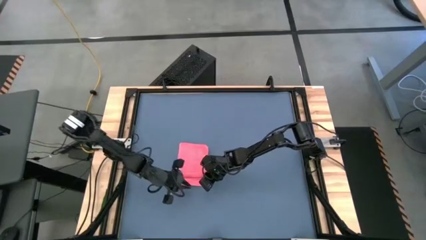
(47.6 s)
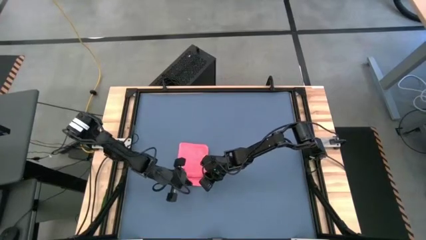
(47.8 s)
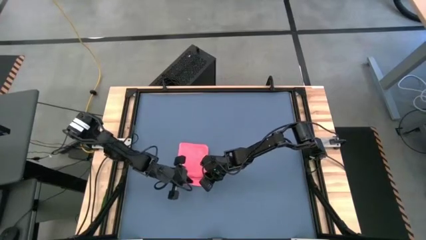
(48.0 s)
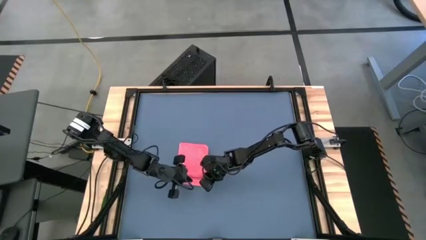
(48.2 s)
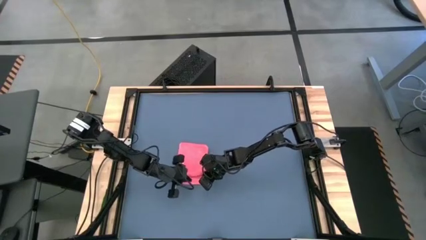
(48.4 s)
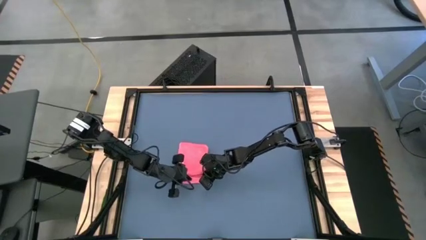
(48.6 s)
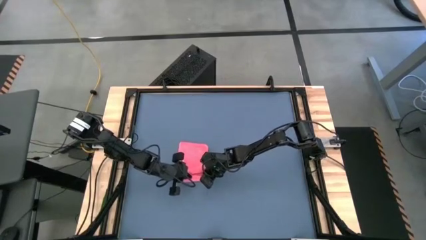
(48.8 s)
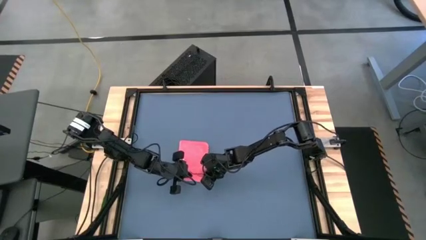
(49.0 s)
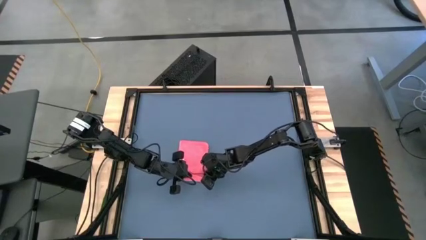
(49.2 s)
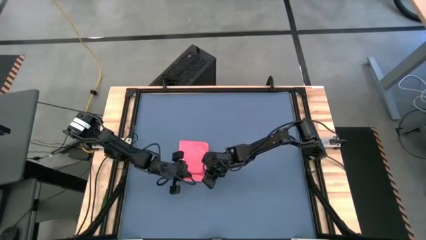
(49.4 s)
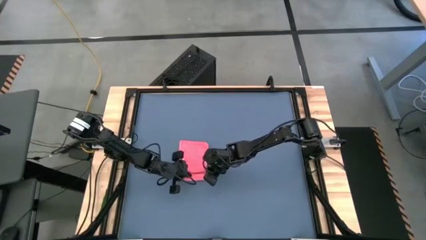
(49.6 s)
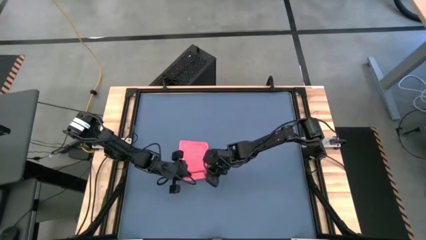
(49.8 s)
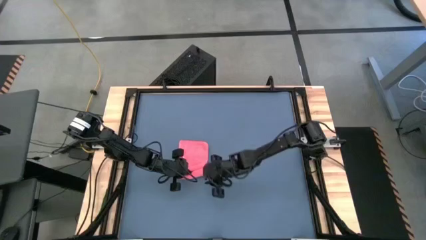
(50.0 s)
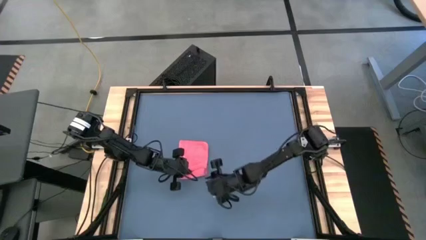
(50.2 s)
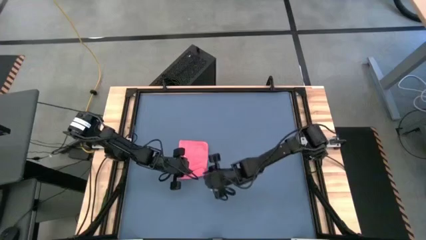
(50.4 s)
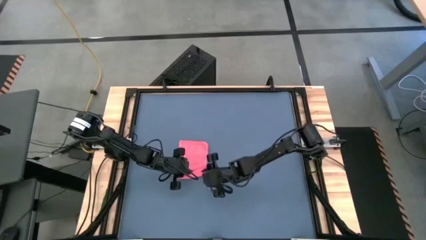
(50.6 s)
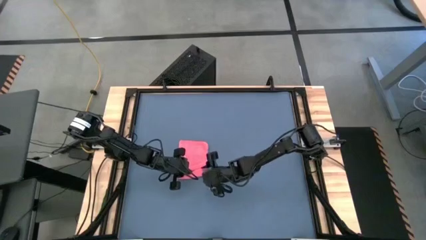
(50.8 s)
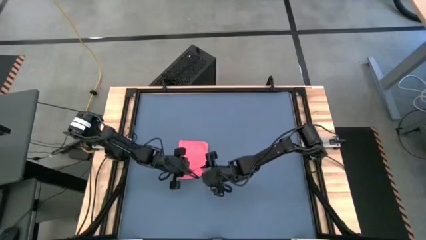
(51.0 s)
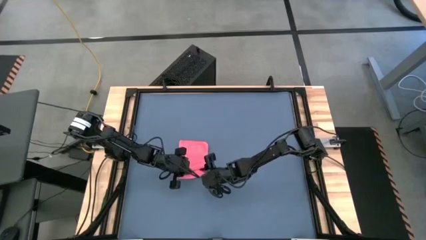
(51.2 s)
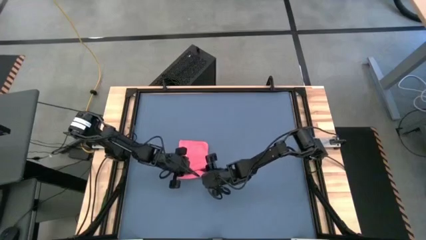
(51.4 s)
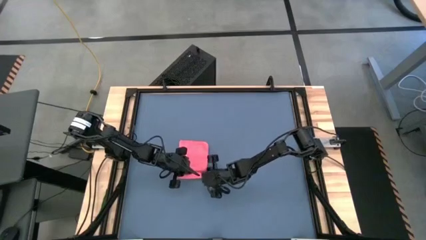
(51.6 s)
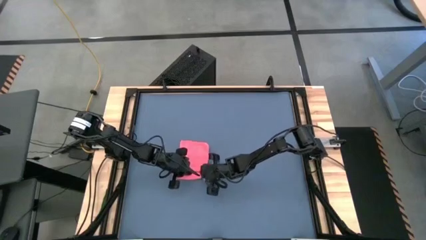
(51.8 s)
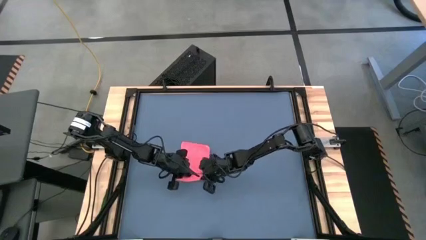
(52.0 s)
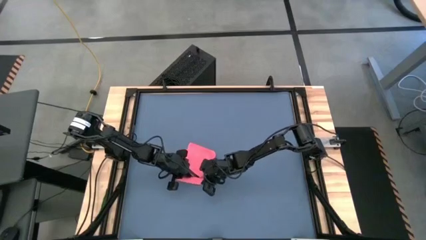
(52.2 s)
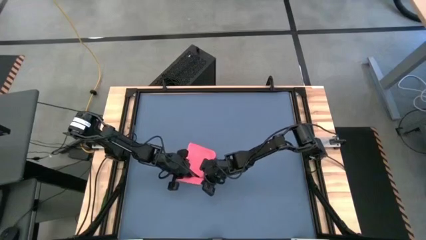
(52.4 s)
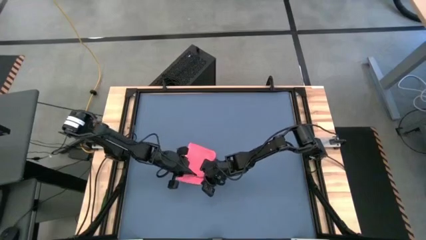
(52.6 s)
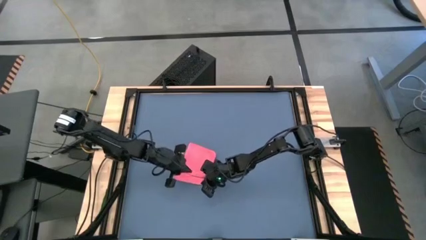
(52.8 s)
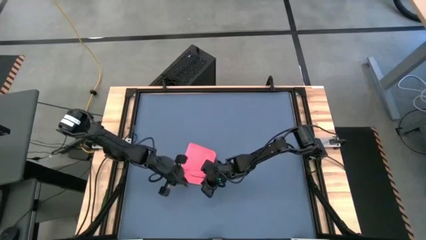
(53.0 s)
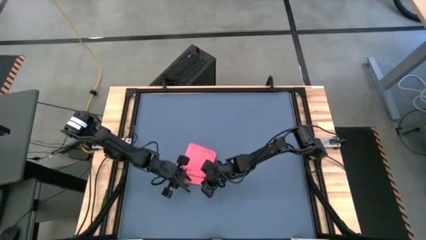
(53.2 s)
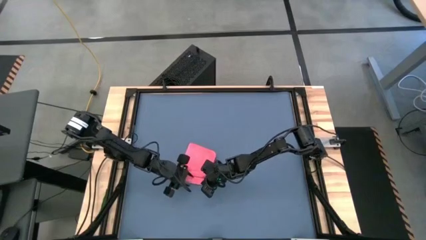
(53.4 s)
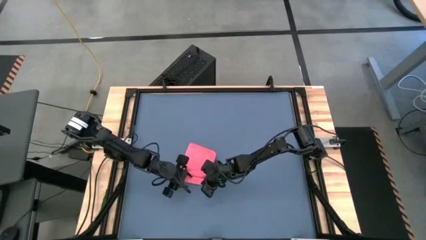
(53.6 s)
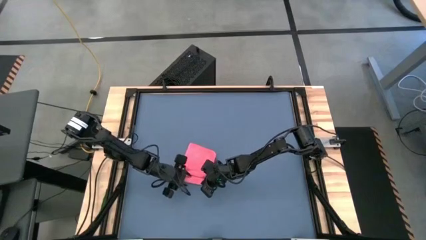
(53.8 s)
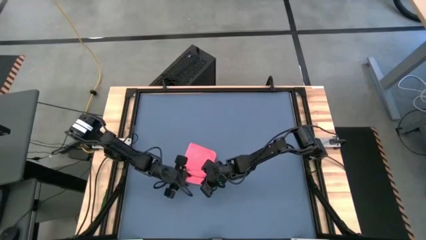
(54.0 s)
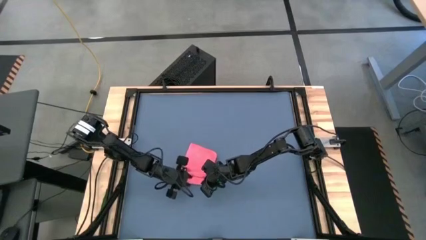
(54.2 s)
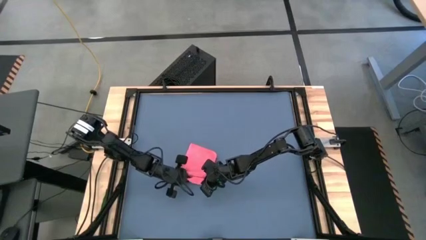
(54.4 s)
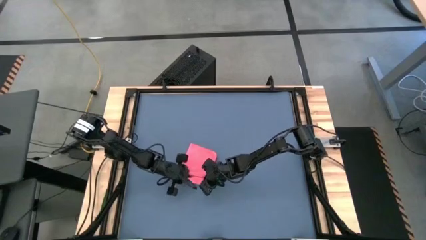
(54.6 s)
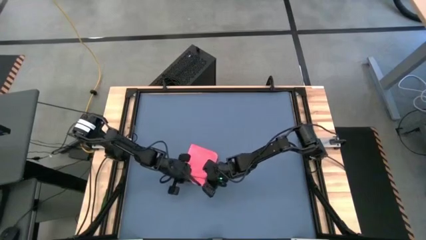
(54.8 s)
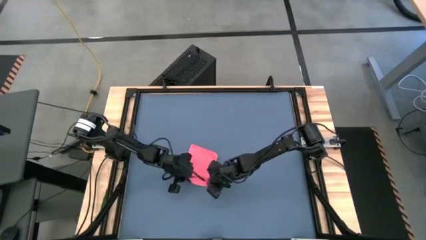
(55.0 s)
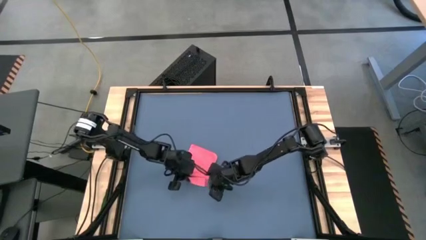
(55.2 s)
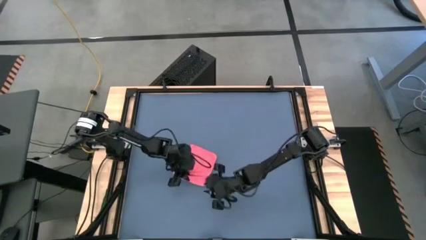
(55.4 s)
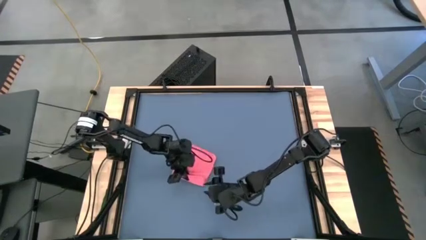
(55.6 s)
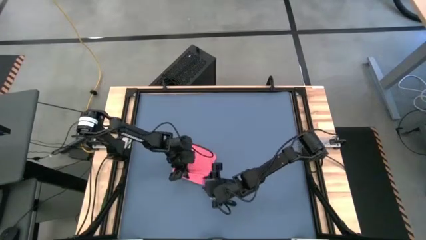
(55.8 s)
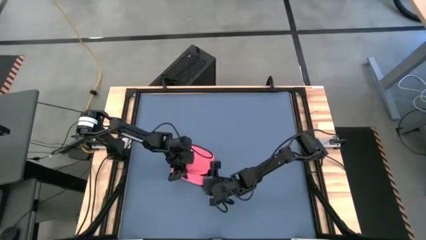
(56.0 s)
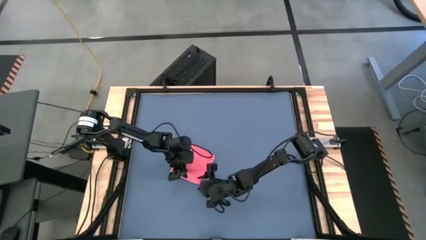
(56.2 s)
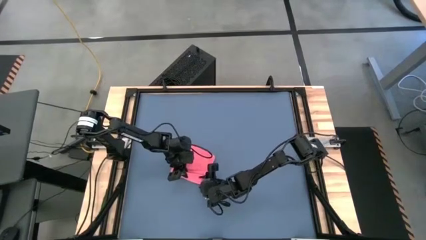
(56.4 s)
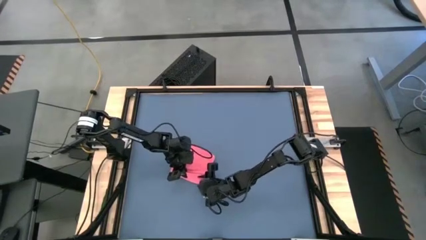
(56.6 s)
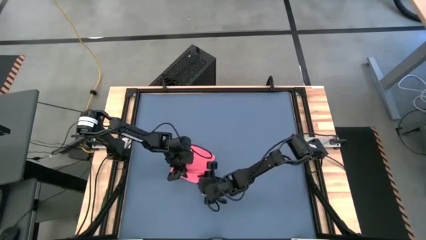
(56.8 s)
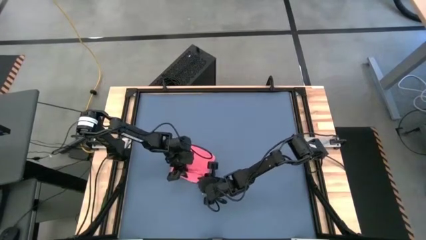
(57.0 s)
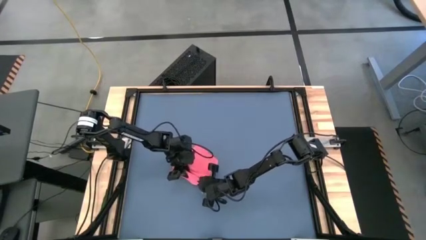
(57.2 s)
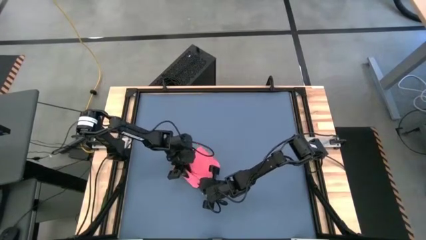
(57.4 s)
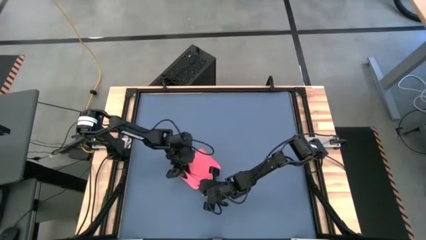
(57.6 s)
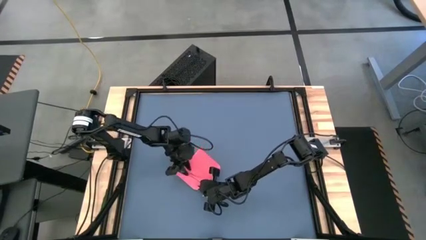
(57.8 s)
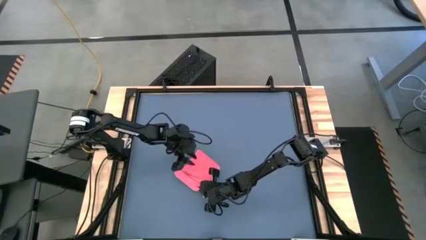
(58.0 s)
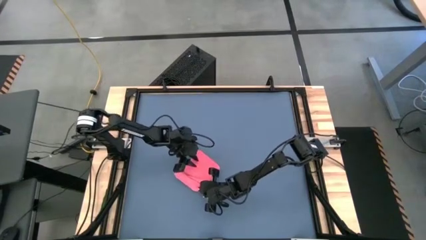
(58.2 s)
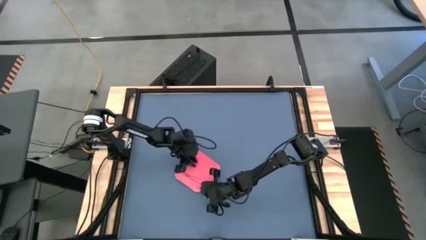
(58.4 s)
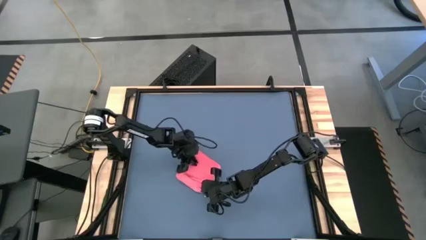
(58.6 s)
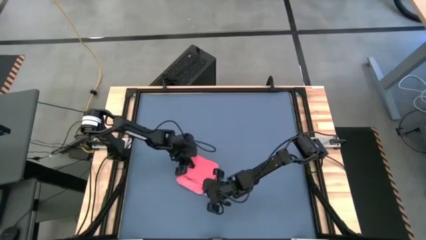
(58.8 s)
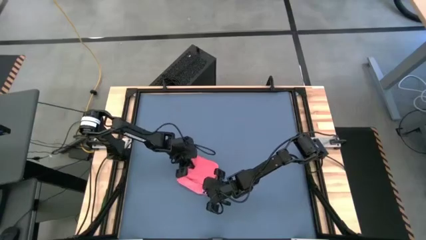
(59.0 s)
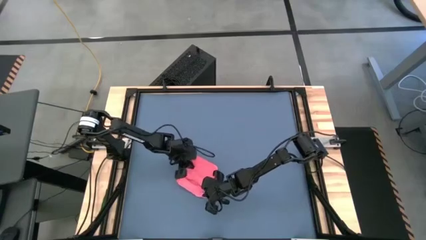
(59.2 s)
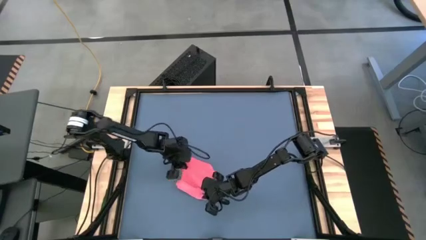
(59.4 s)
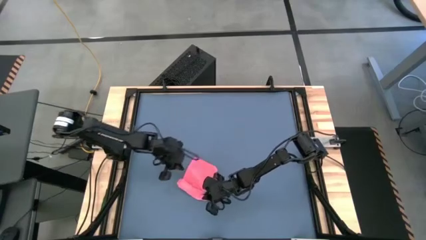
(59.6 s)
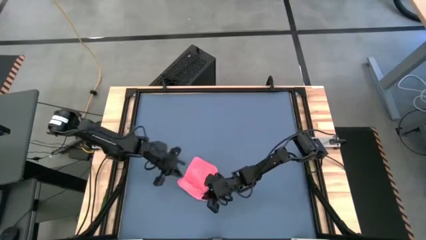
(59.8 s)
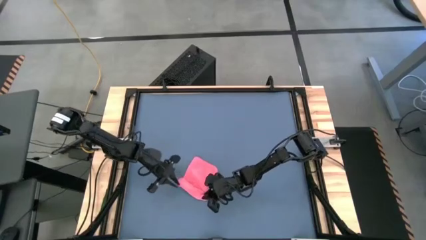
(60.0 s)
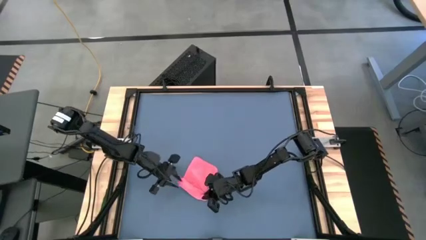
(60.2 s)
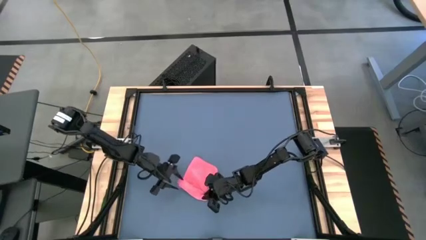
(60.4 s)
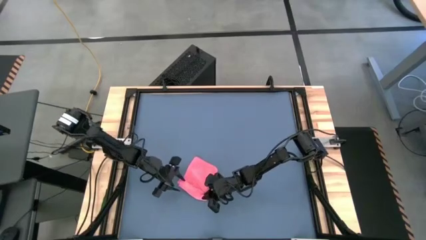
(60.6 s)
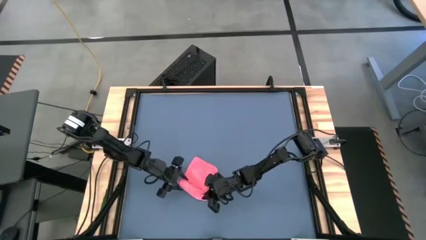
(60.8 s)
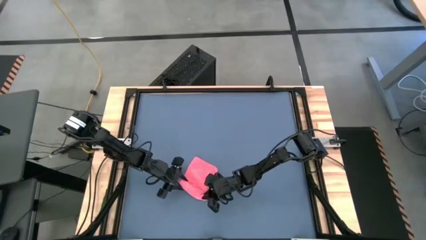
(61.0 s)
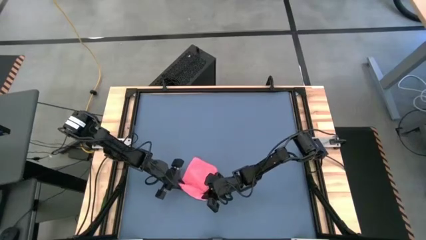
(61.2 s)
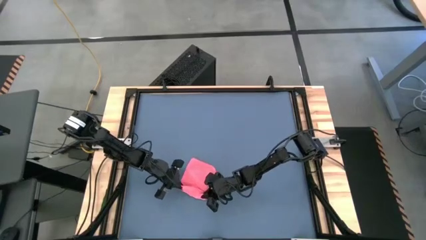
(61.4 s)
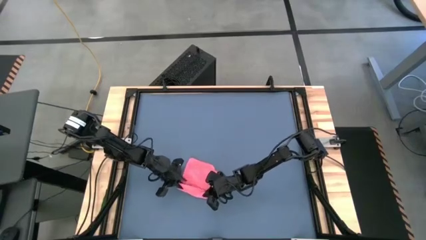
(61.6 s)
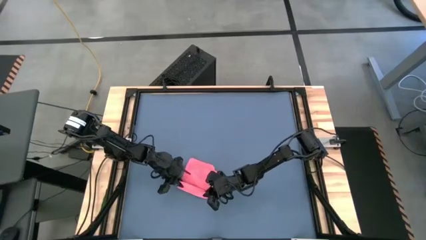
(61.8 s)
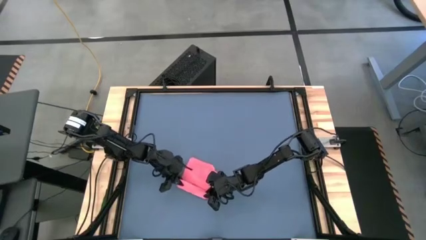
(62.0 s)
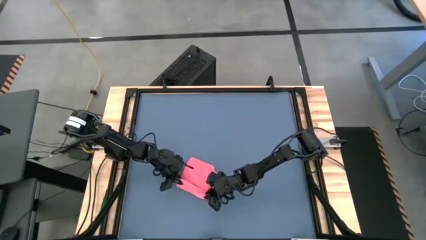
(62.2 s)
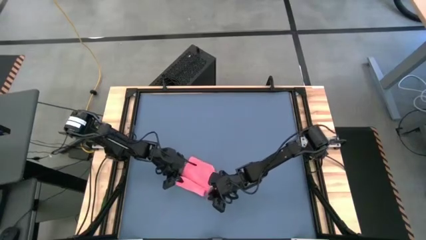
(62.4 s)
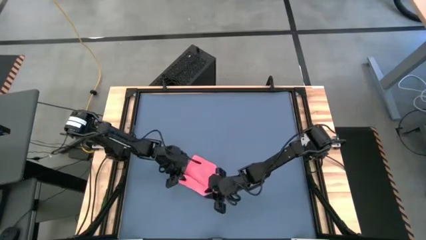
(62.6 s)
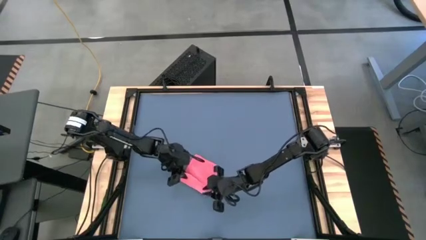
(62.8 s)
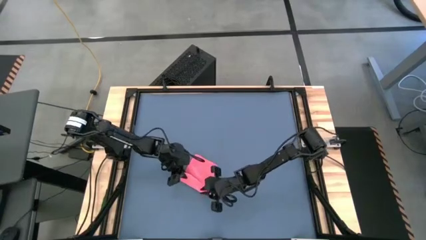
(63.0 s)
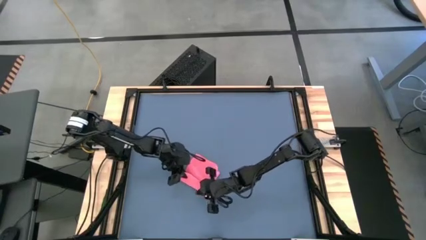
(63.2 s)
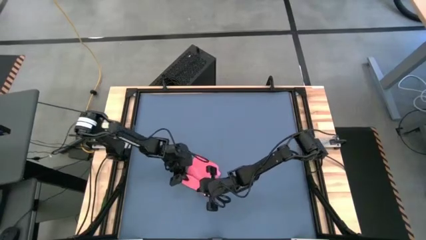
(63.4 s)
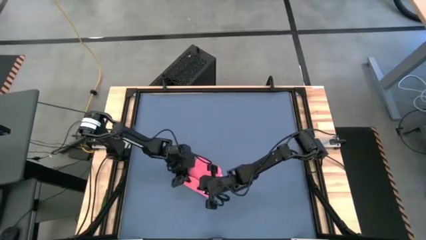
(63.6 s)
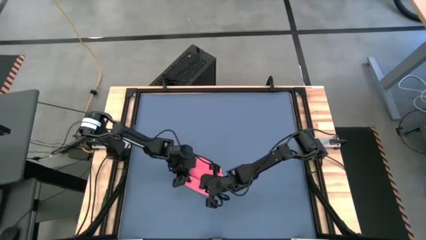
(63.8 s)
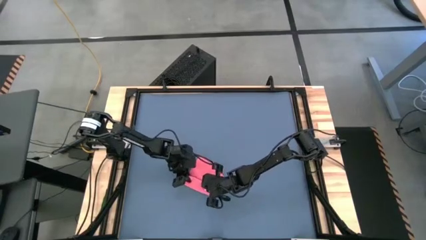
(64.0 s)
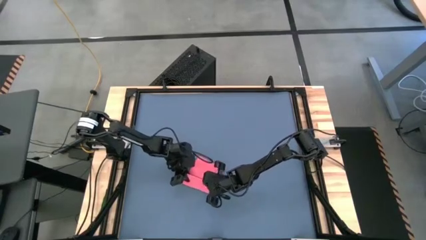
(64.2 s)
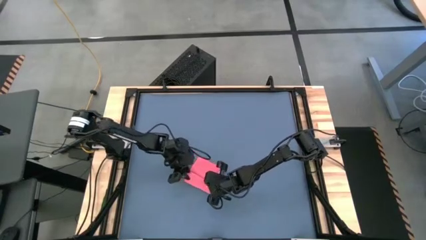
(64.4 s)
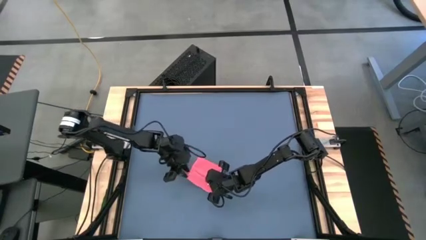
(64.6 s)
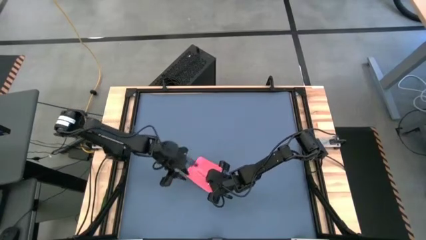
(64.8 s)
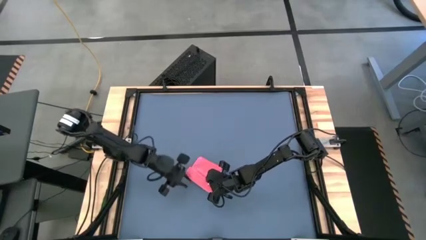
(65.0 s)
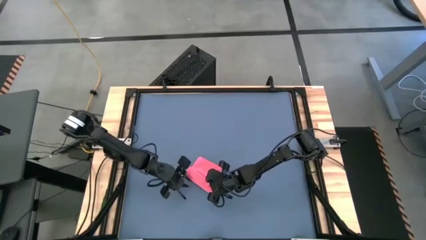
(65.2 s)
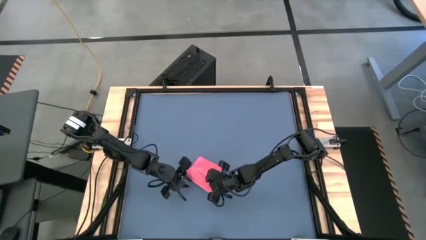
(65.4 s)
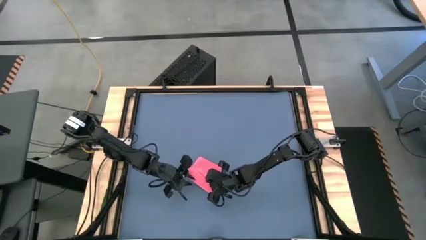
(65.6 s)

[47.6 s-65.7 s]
Task: Roll towel into tight, uniform cylinder
Roll the red towel
